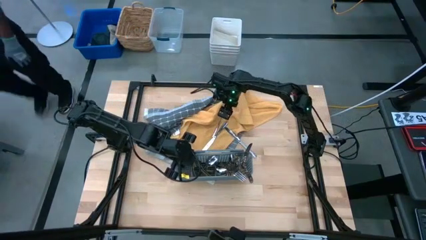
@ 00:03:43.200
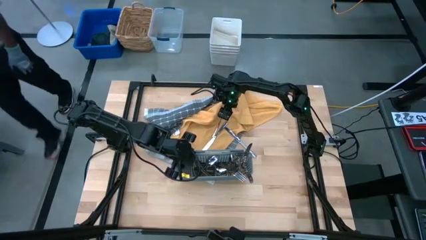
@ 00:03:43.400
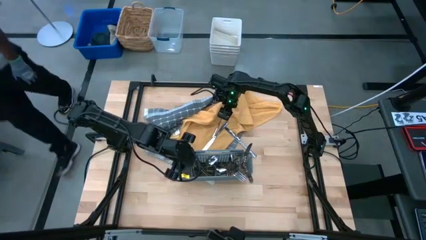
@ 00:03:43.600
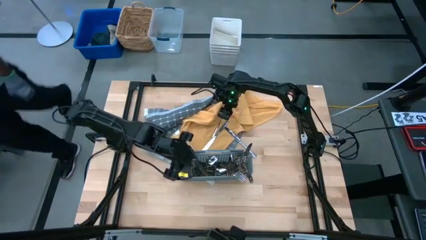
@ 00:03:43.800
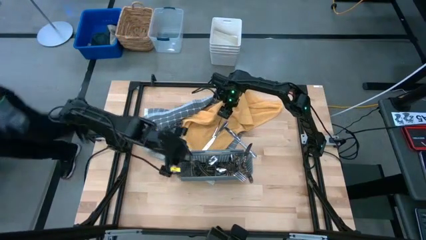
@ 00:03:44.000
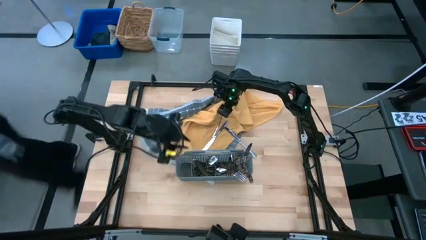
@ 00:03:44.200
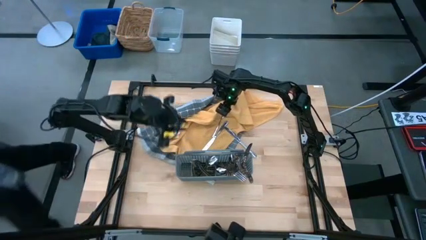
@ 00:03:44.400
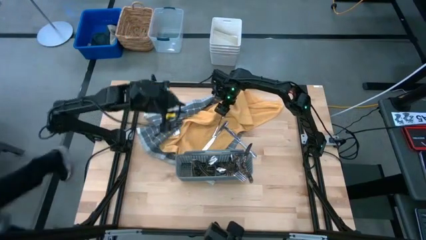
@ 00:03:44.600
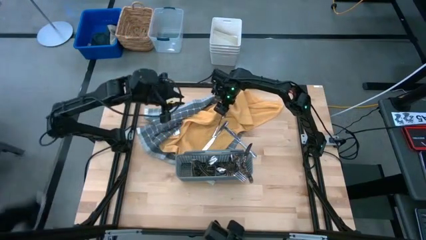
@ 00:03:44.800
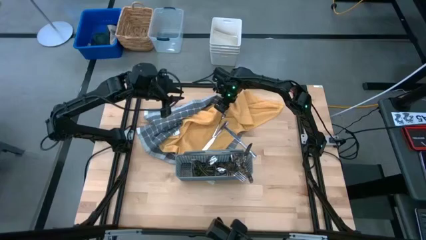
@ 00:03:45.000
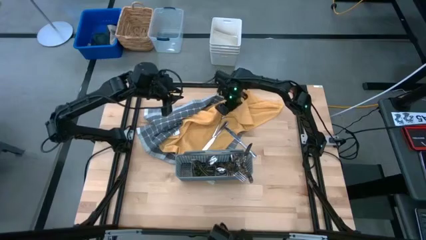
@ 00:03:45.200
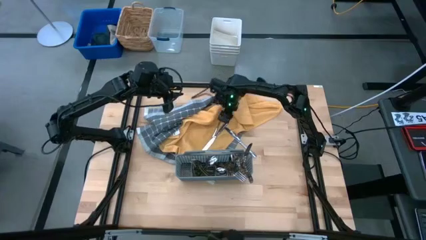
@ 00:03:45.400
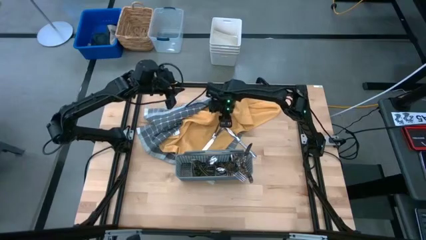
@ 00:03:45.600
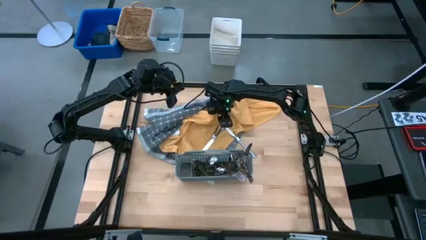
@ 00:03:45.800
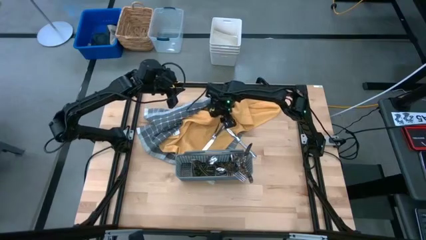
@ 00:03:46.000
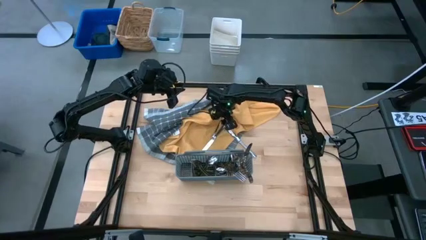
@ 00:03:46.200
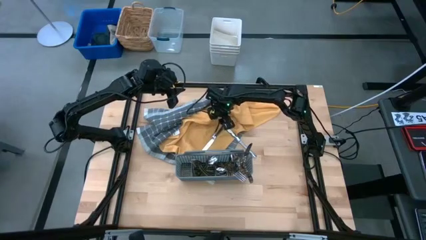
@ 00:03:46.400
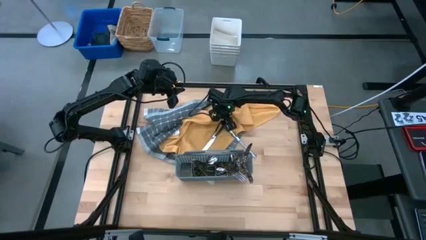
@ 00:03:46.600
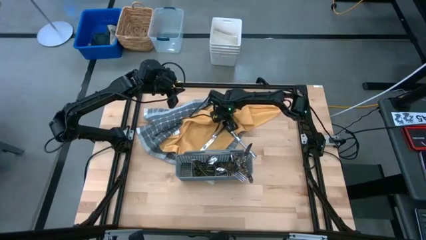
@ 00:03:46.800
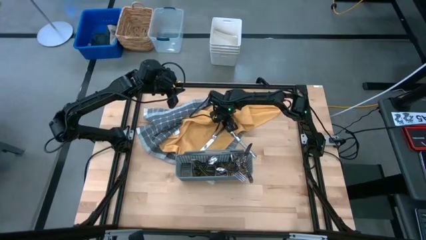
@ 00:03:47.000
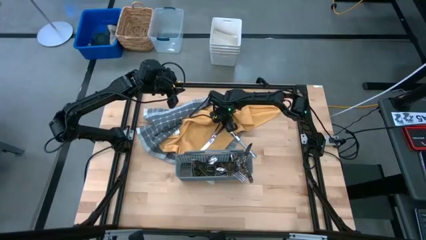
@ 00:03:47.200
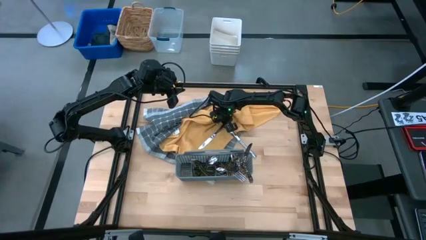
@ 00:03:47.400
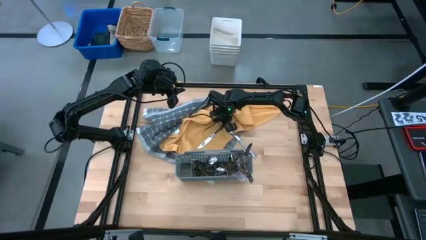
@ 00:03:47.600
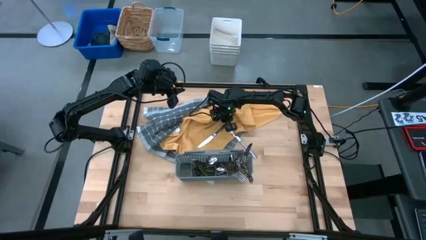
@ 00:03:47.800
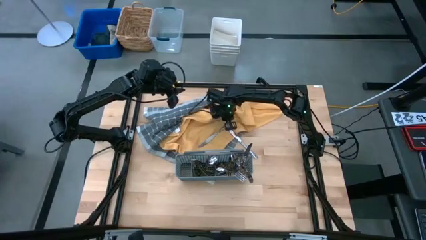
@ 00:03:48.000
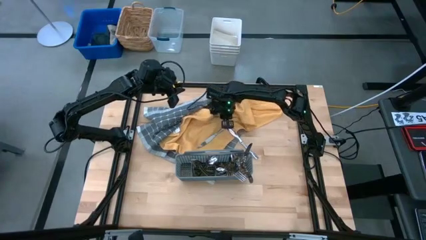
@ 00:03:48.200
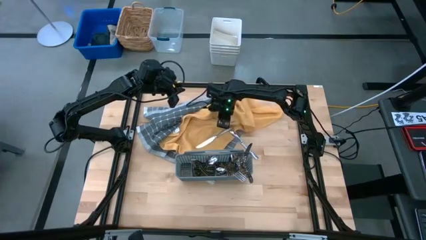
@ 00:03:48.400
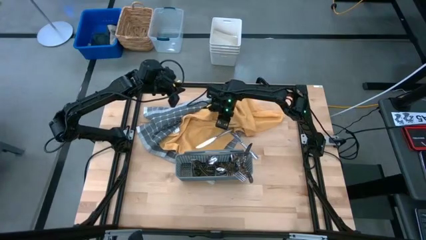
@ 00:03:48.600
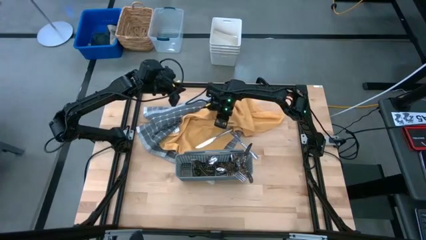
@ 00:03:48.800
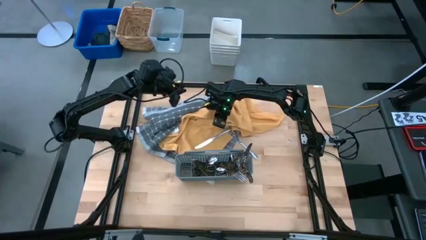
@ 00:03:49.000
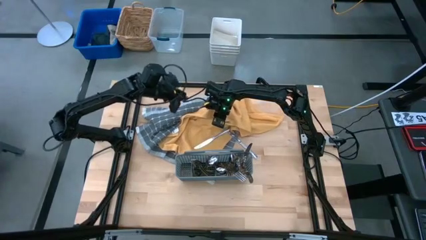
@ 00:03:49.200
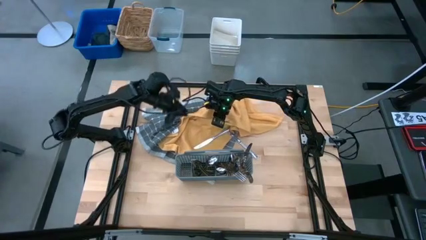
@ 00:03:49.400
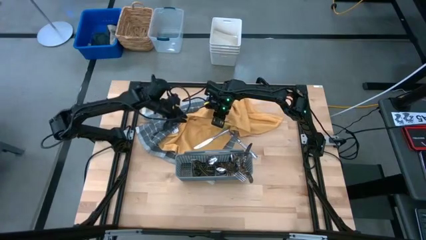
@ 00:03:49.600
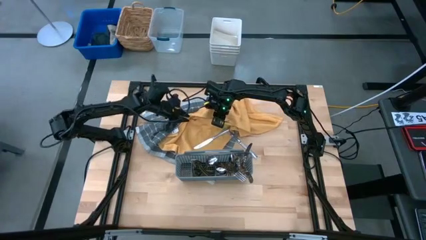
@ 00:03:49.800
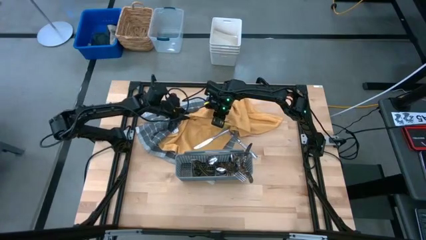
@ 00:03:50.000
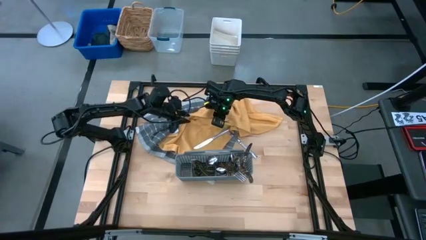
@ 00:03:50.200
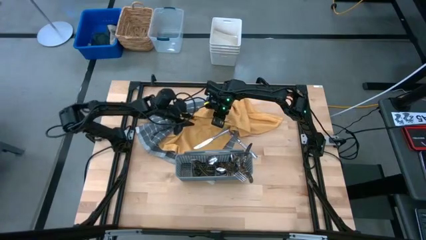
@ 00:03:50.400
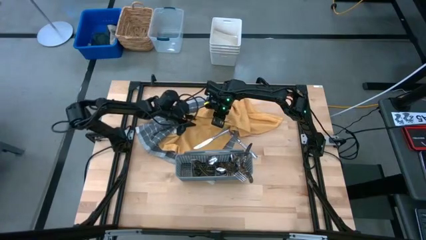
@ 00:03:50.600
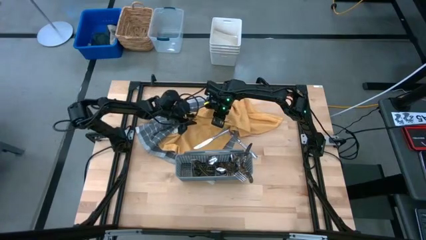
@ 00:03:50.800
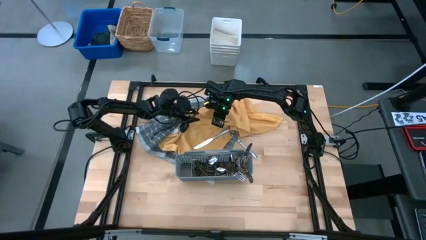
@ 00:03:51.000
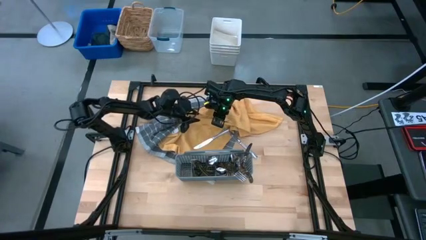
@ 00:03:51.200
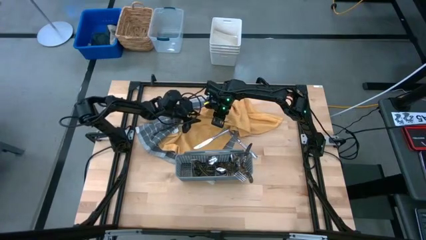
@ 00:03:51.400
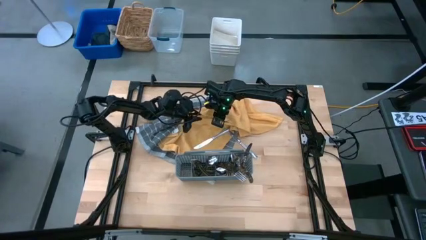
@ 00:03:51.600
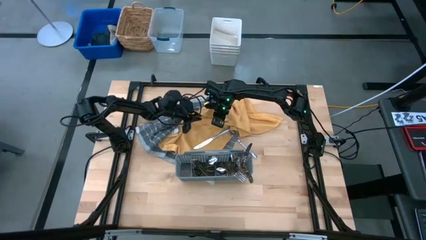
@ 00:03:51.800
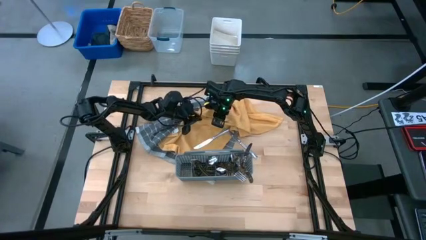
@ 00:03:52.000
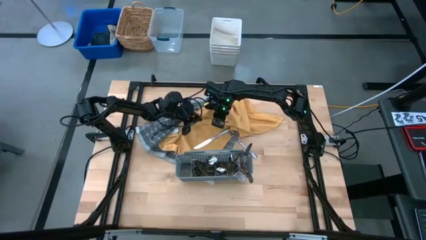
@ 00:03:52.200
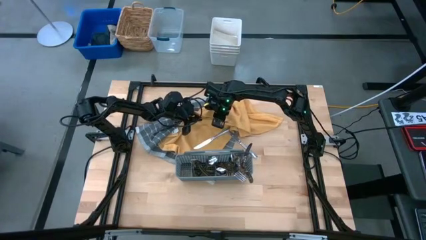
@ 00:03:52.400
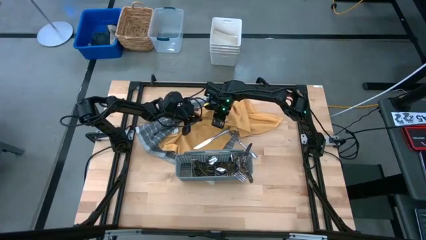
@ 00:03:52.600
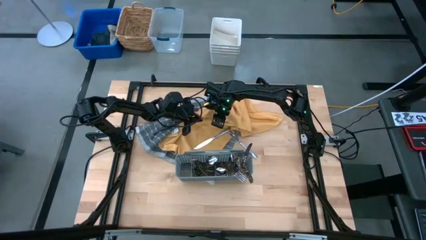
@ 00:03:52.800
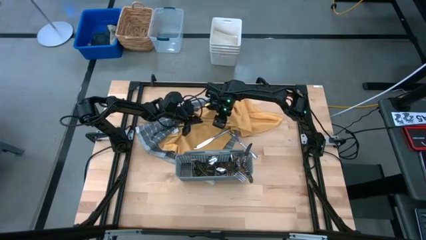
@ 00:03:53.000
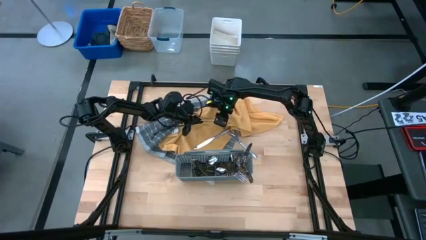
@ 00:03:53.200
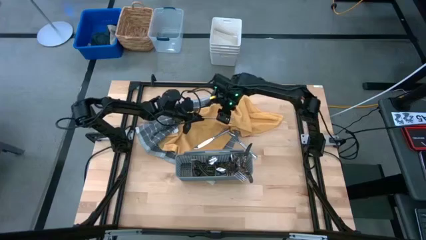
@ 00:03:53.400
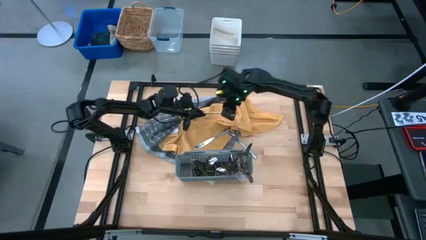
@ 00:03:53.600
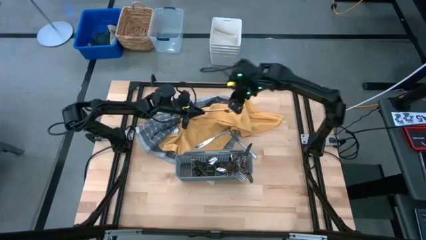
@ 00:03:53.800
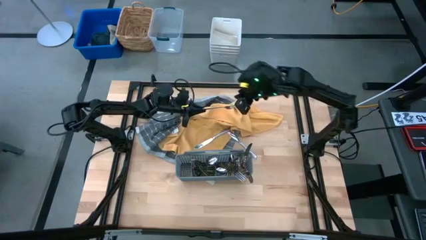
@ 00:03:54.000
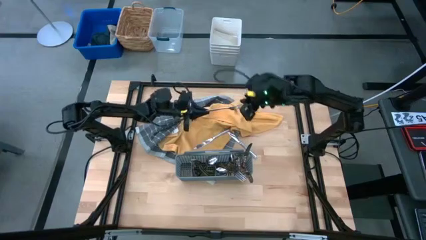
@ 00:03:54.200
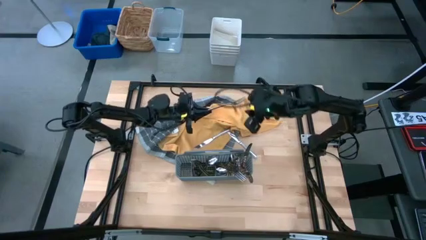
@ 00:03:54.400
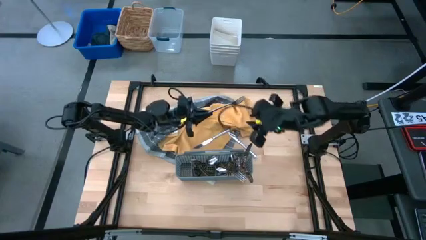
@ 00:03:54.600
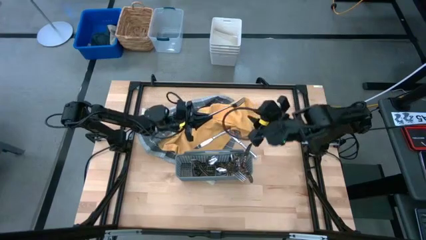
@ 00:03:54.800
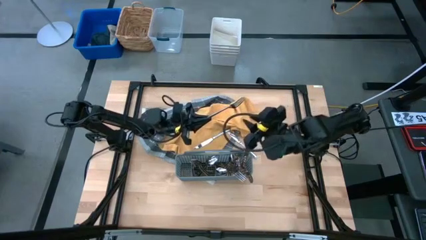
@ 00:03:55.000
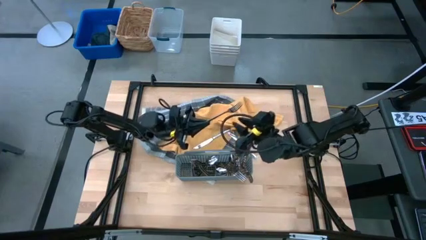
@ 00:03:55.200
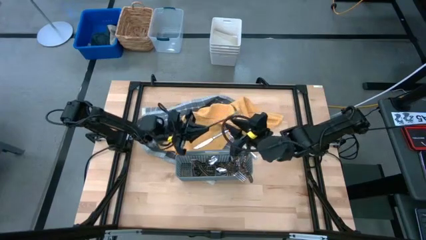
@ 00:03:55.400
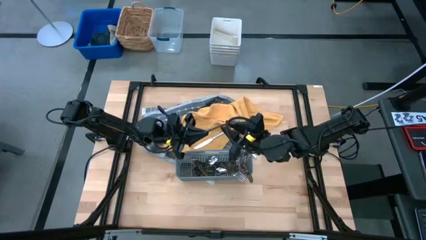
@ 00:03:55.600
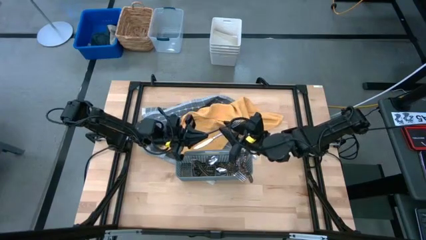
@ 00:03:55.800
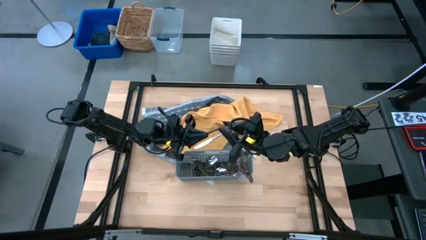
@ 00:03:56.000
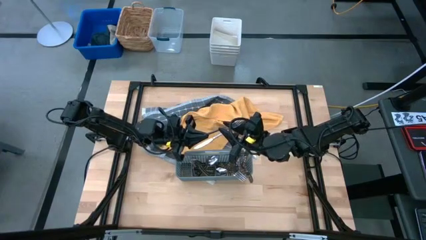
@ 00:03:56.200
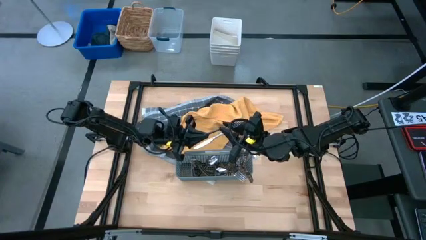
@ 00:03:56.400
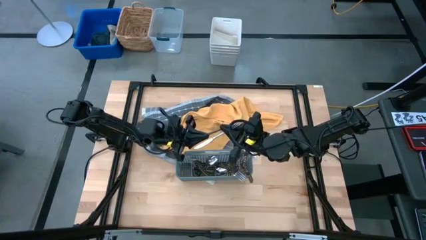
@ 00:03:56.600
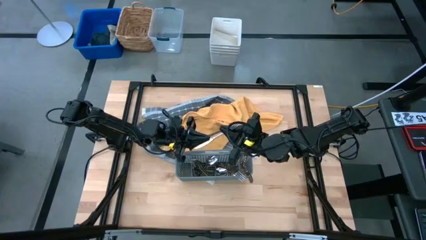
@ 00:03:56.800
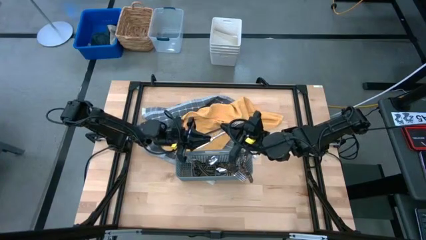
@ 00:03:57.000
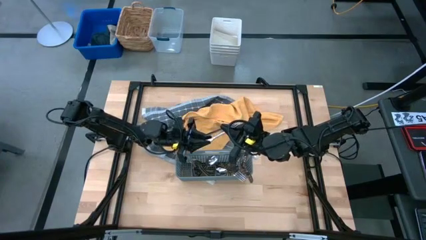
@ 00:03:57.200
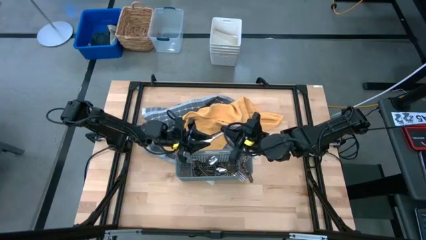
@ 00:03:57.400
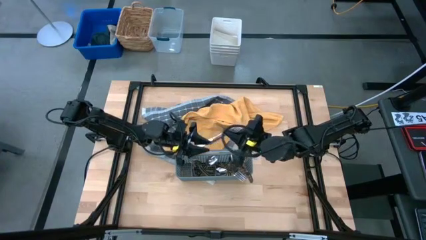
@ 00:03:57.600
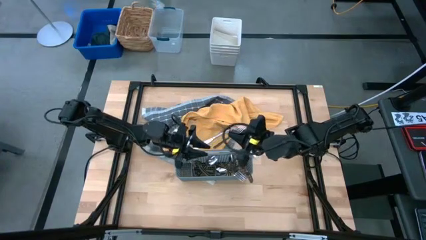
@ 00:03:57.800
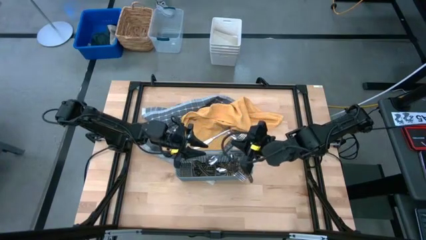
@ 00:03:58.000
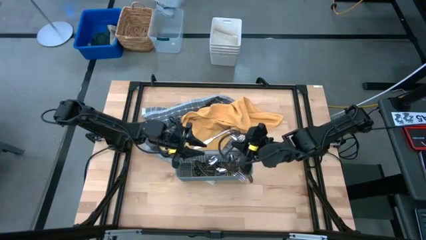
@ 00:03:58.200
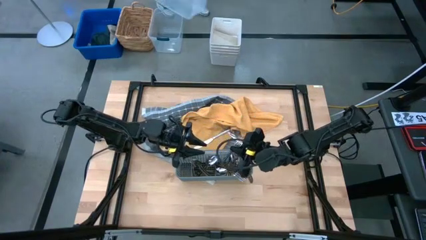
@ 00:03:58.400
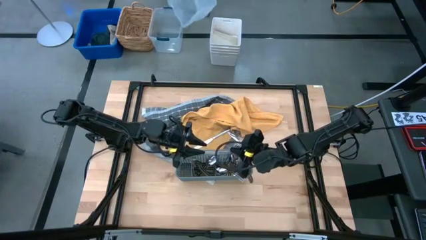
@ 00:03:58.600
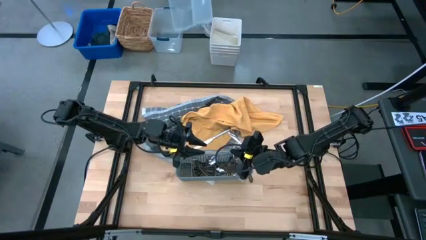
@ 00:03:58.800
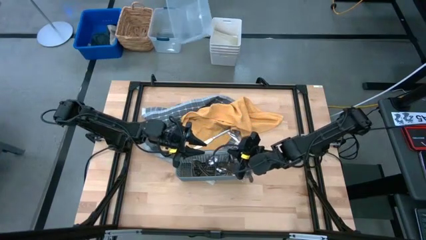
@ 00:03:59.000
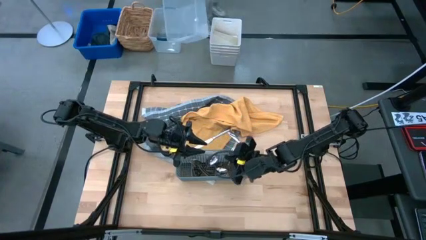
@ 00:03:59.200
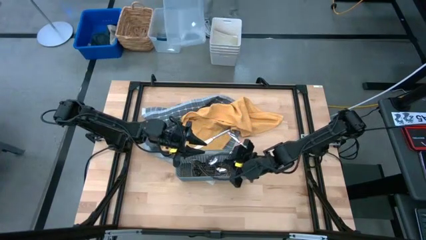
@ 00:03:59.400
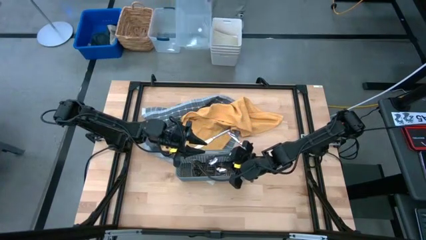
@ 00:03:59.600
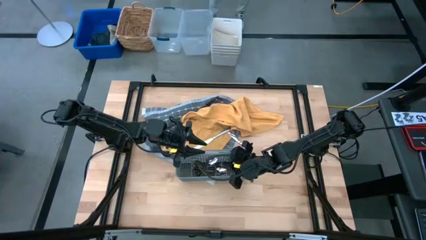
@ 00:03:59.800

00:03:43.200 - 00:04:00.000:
Task: Sort silverware
Put the silver fork into the gray silverware basket
